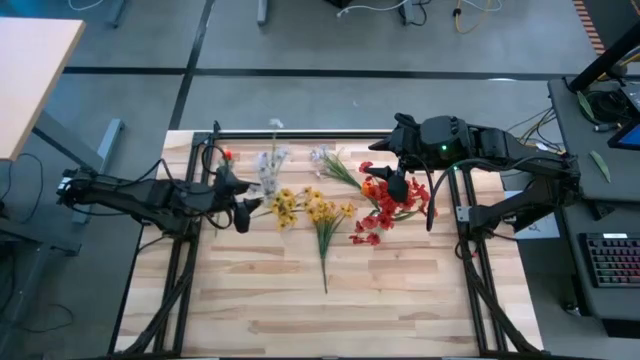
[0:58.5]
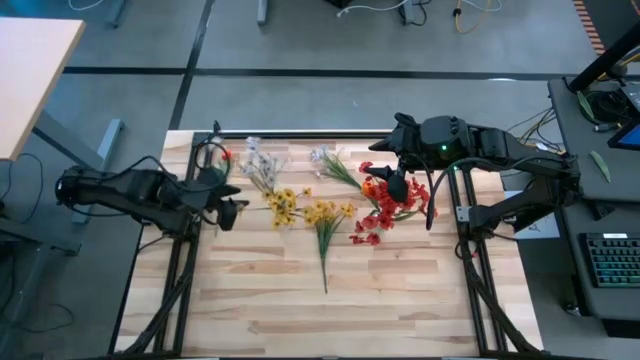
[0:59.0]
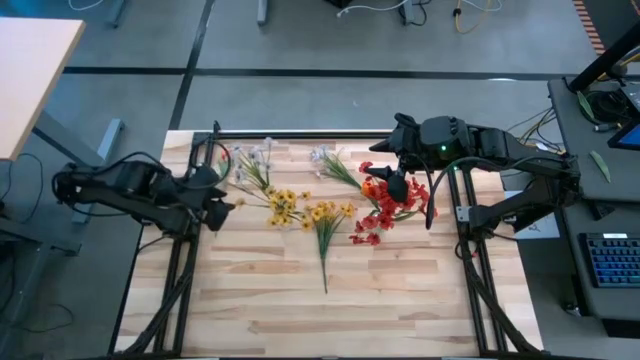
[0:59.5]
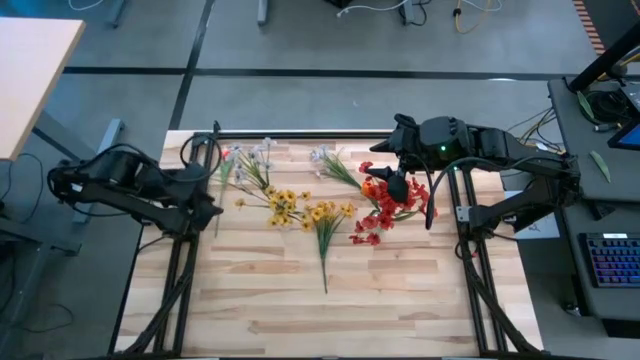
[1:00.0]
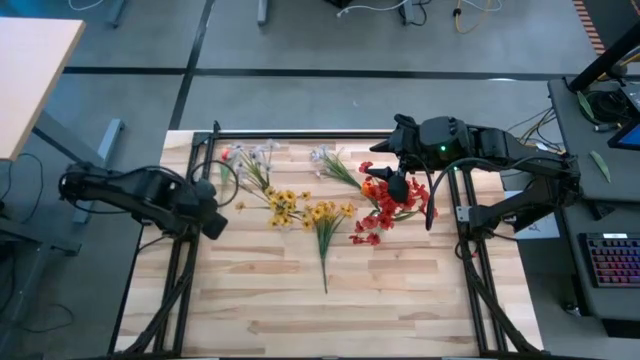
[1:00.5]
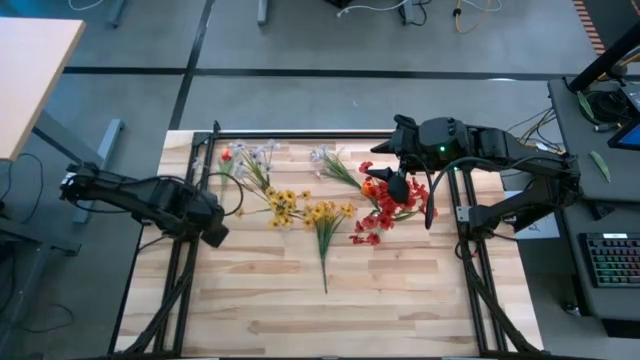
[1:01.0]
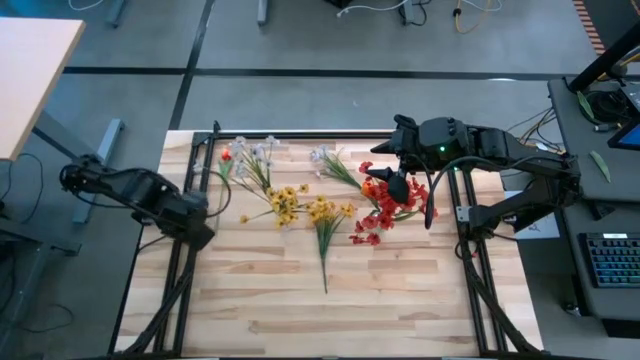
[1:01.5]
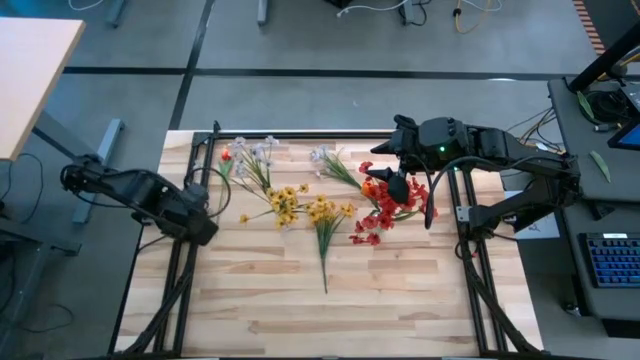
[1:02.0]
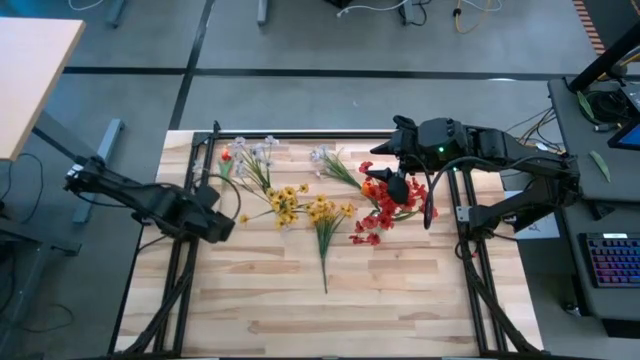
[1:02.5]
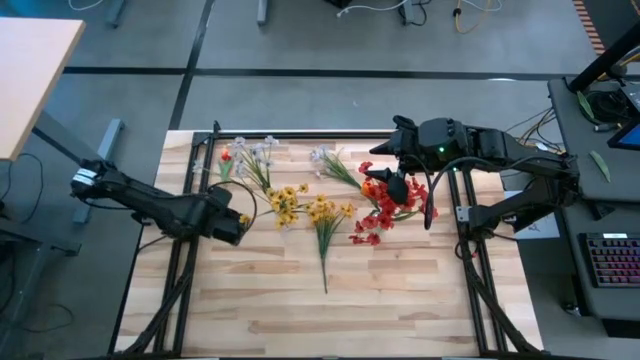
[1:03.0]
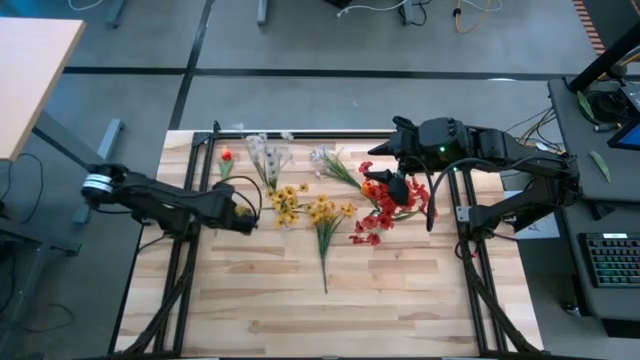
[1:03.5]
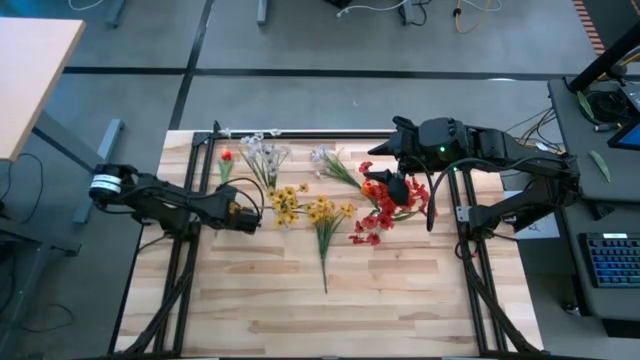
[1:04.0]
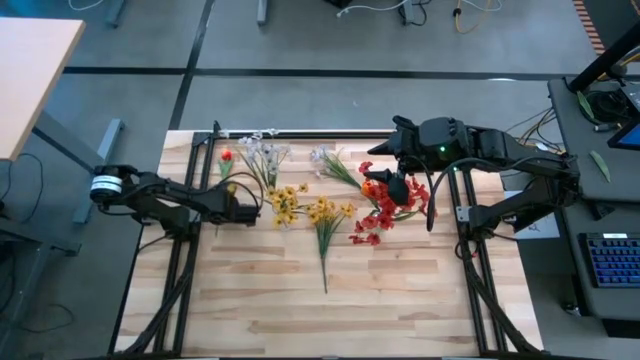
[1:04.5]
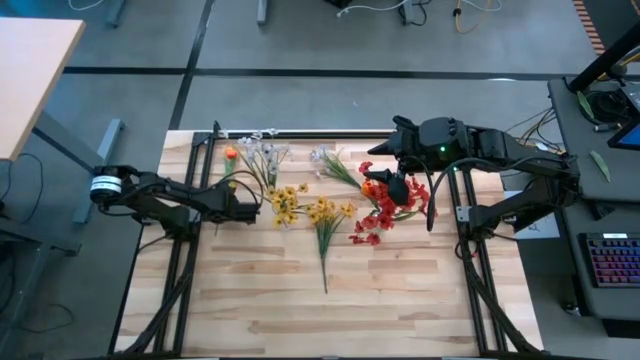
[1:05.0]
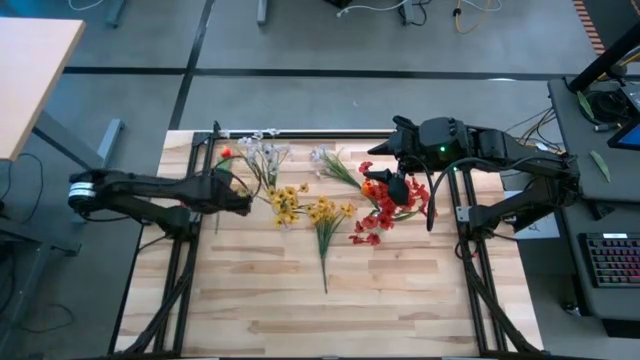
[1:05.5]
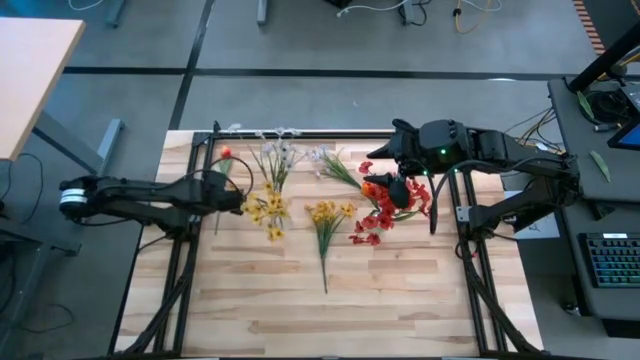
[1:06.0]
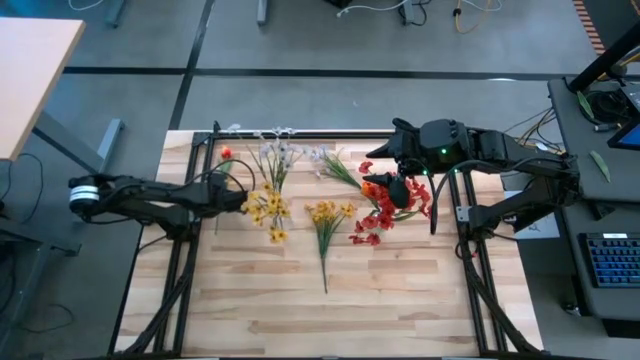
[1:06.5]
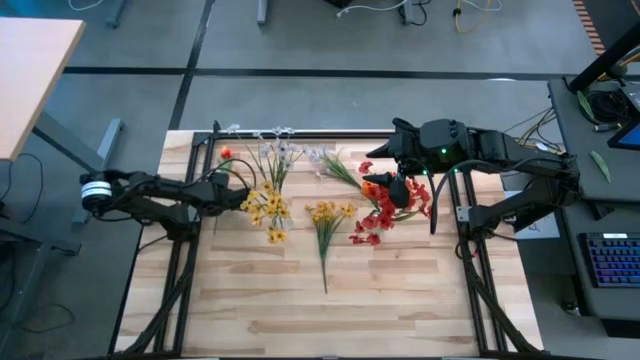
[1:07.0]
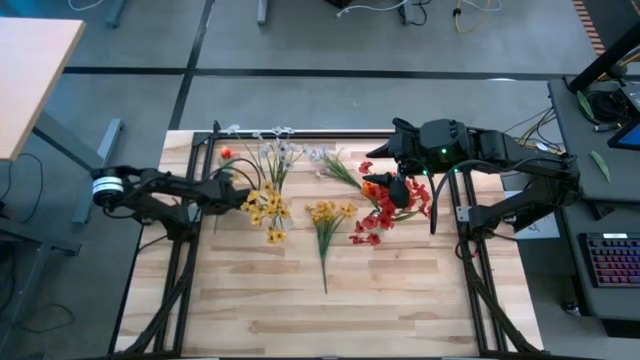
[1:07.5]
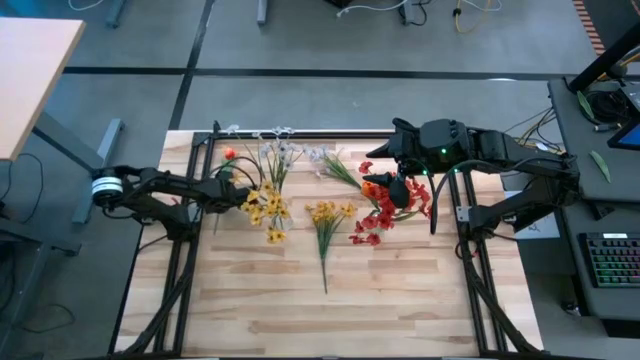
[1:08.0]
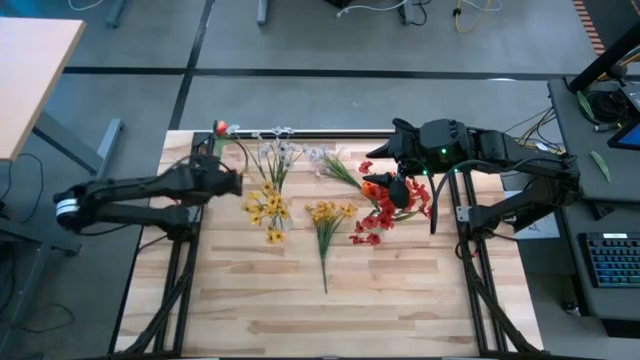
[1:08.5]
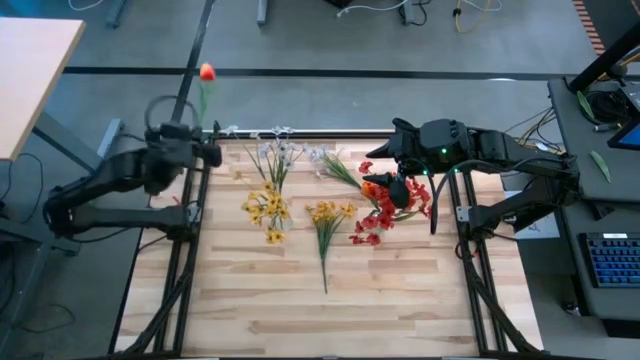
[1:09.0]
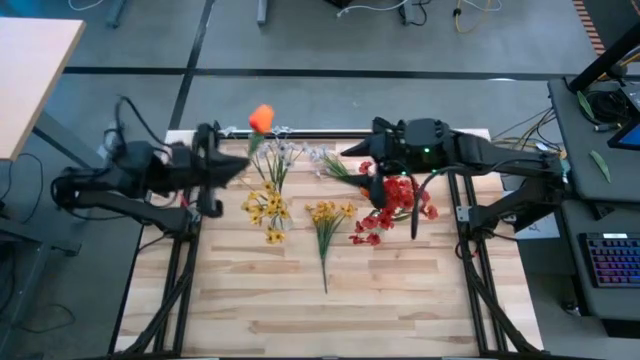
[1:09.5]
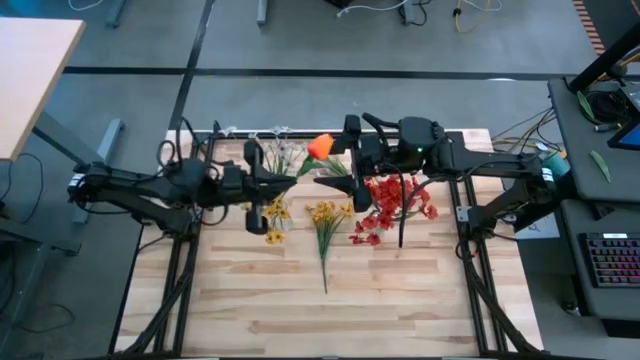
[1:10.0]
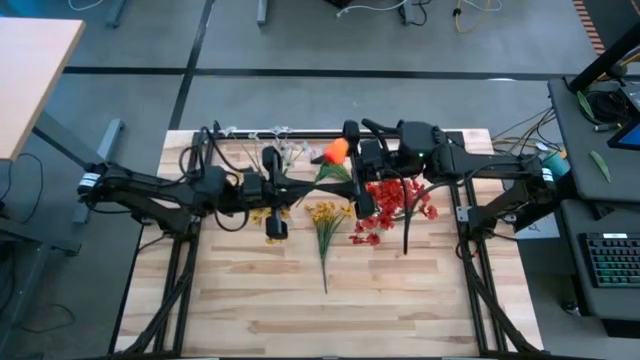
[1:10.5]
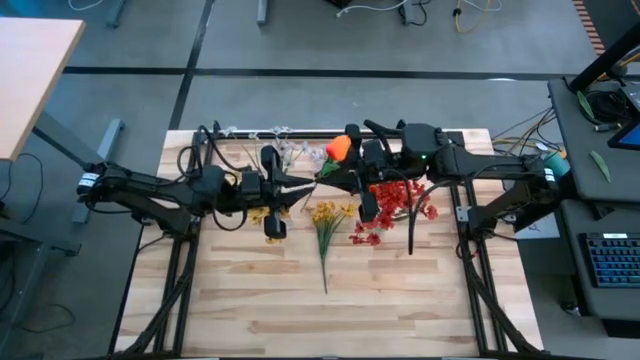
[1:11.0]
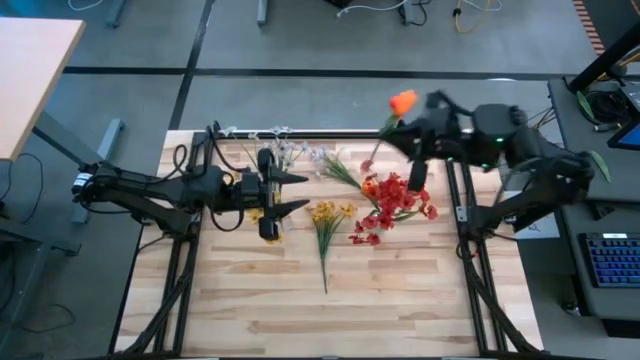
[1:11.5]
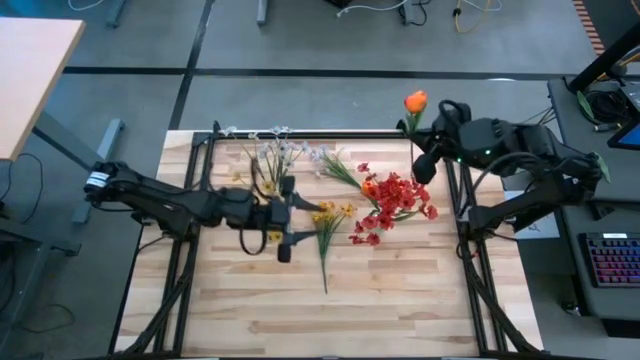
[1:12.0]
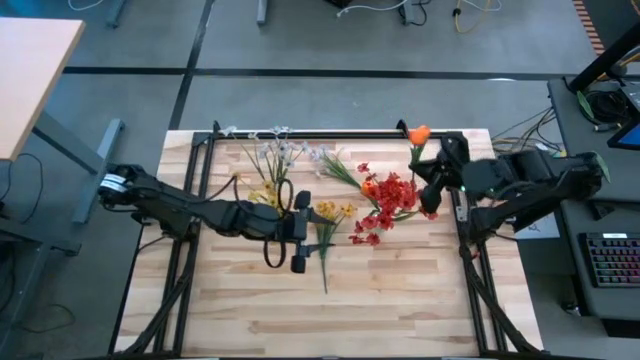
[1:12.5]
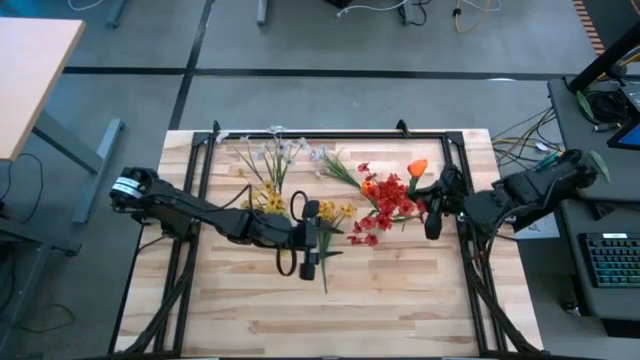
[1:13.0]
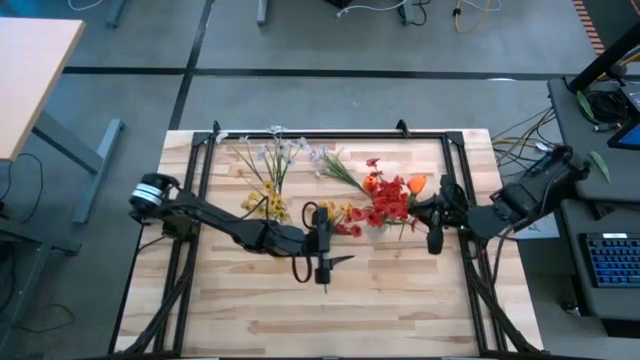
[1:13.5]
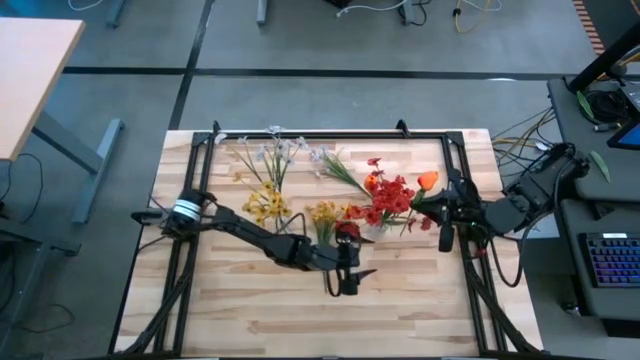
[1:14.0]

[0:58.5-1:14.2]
Task: Sort flowers into vase by color
Put the orange flower into the right transparent vase

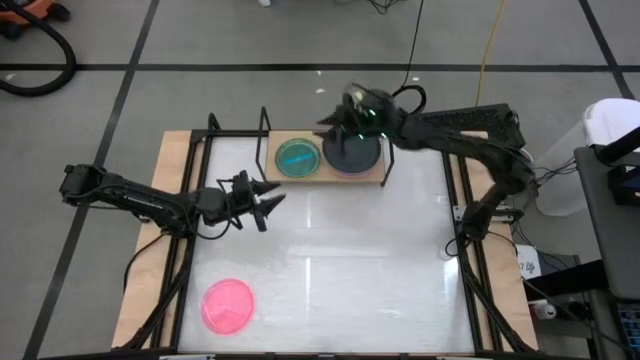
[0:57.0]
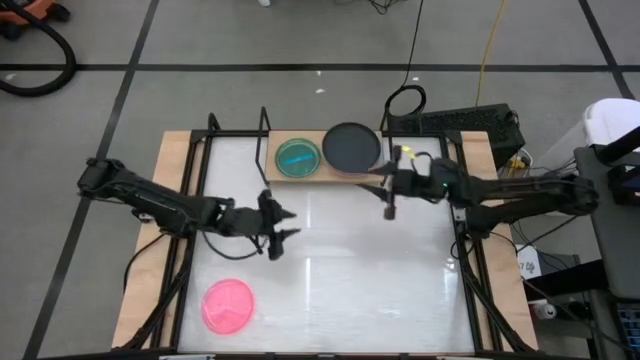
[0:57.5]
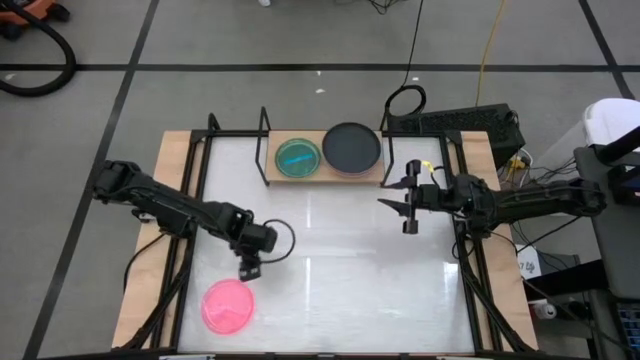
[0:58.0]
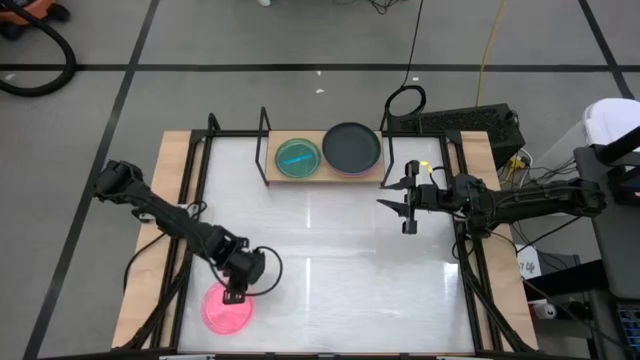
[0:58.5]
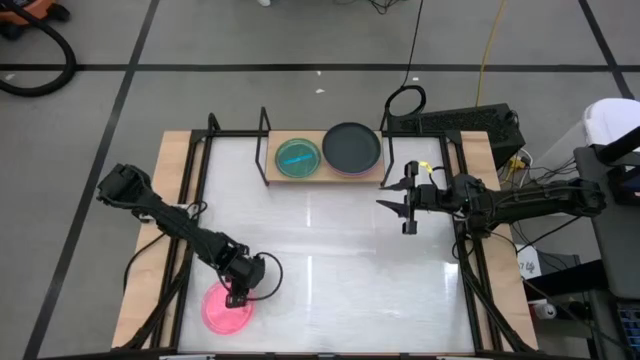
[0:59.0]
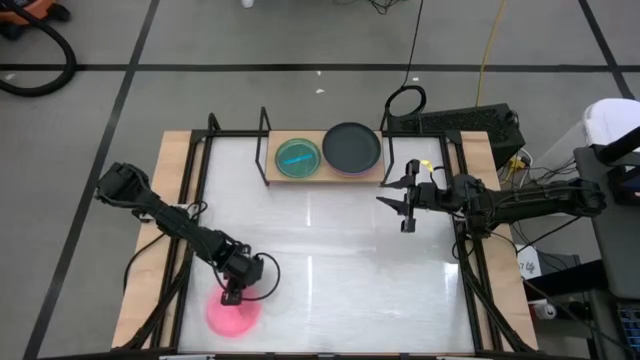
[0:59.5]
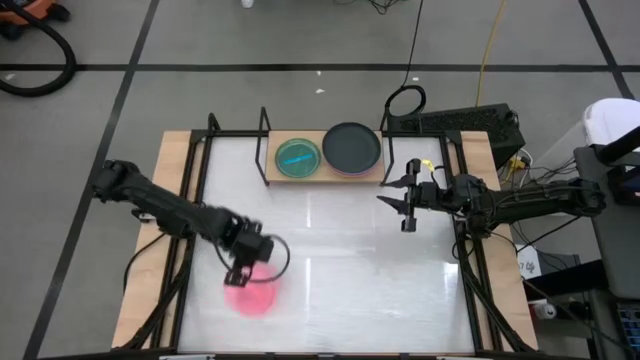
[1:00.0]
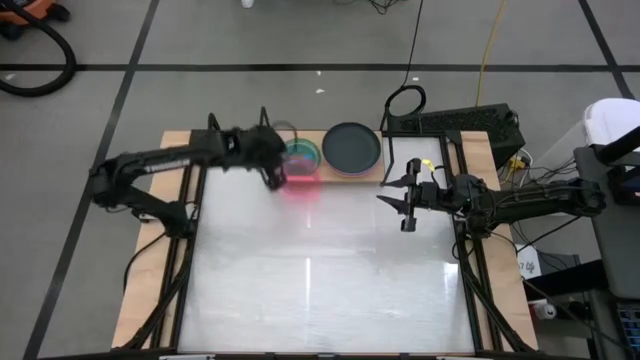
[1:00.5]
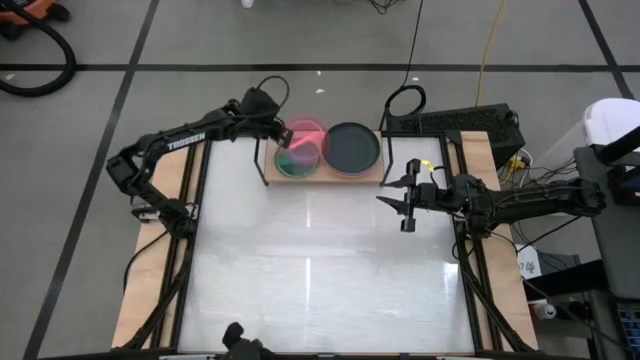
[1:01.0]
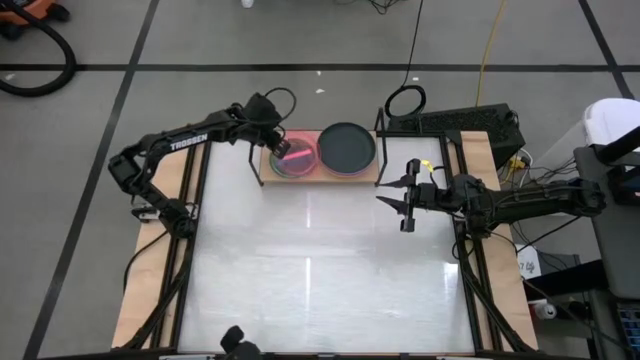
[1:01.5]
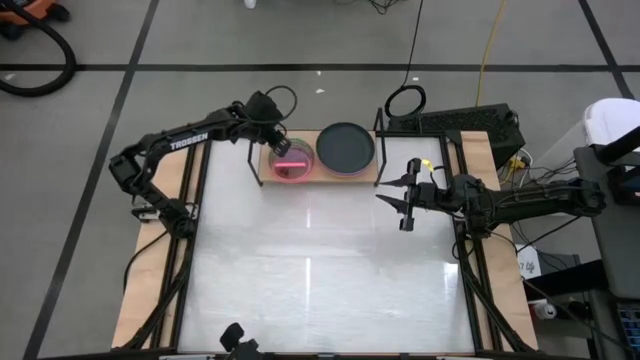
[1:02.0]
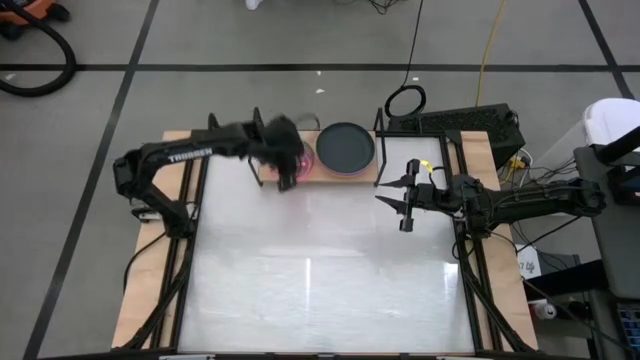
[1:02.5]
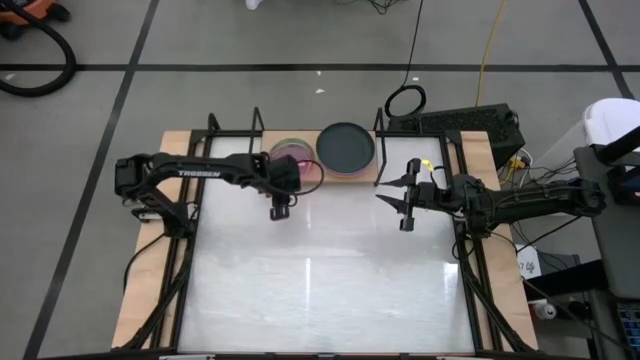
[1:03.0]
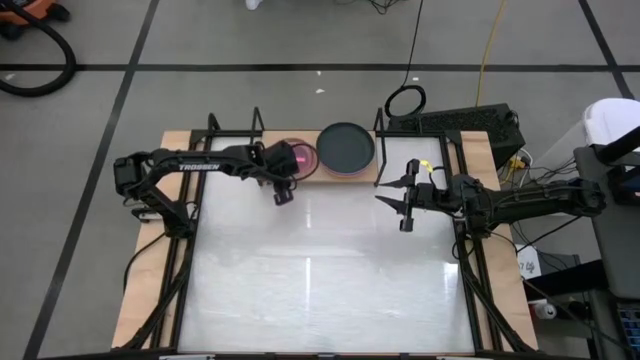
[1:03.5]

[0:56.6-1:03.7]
Task: Place and stack plates onto a shelf
Stack the light pink plate on top of the light blue plate on the shelf
